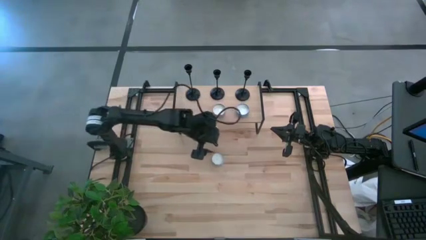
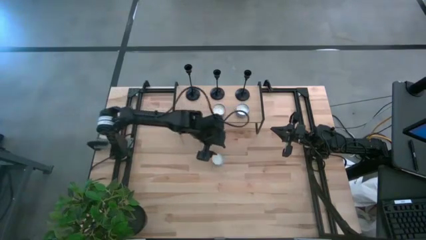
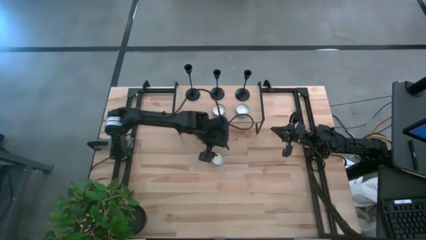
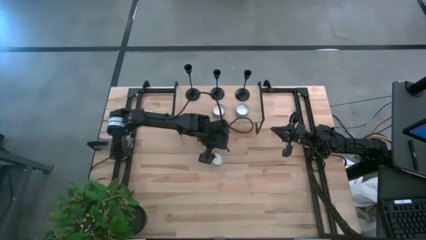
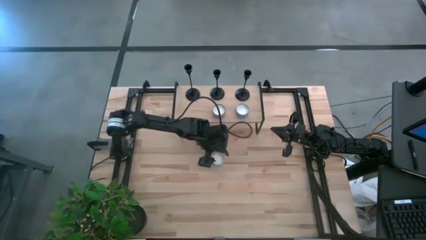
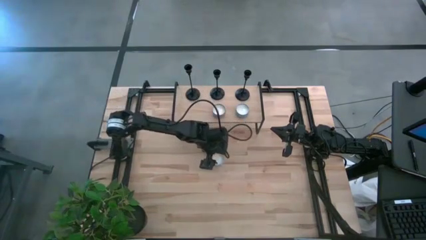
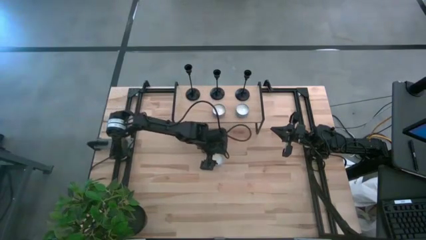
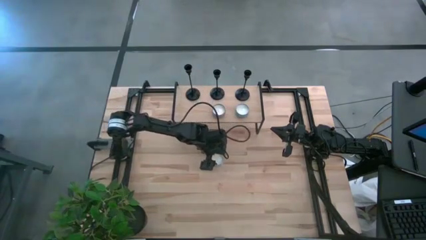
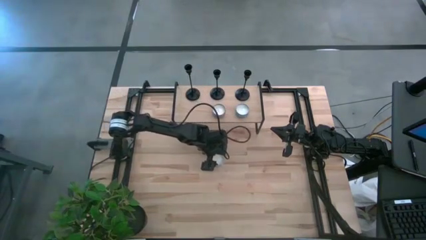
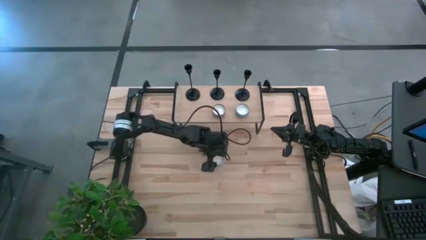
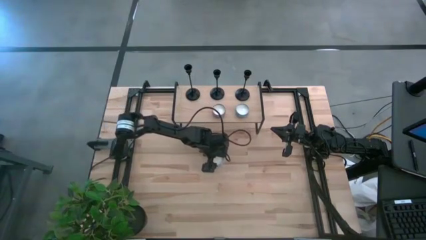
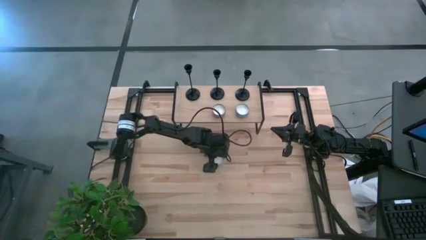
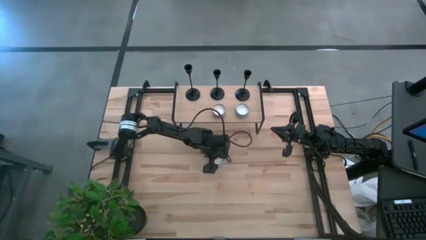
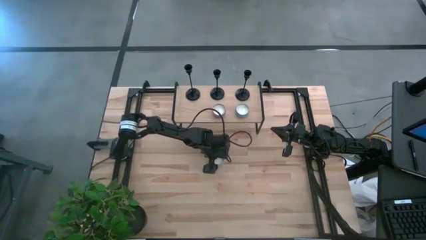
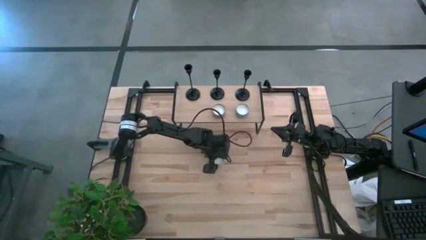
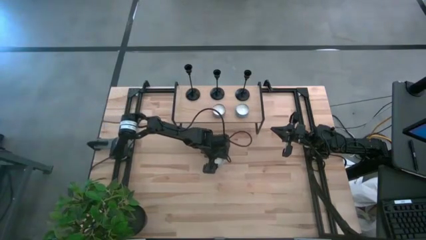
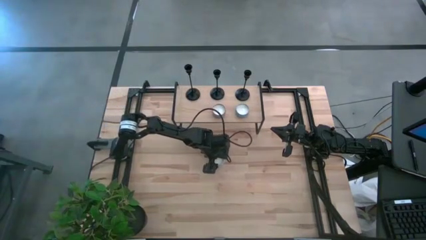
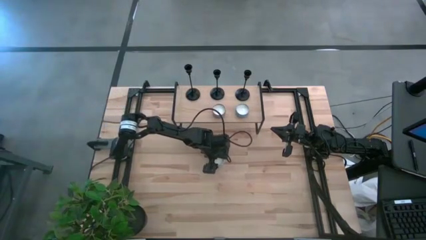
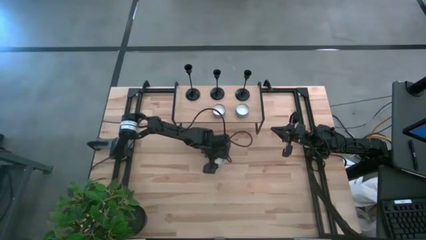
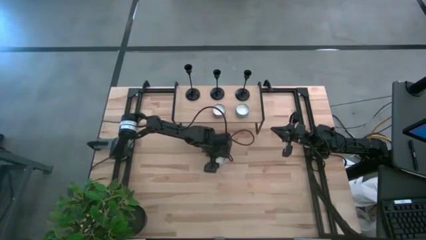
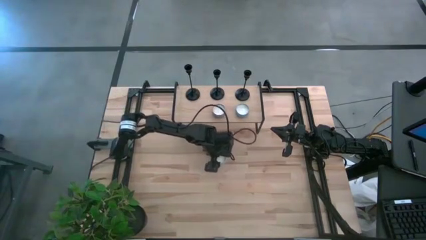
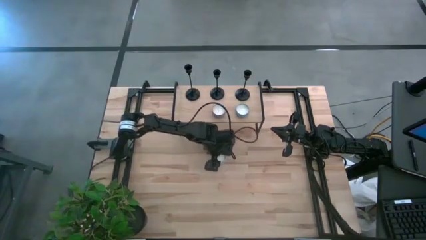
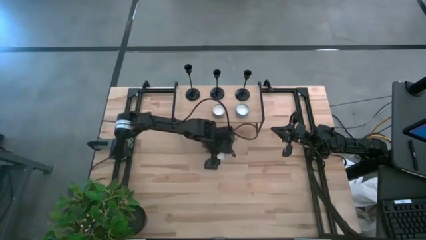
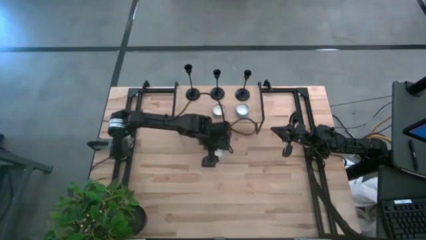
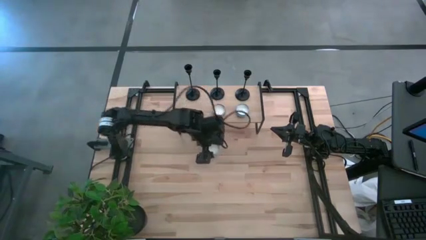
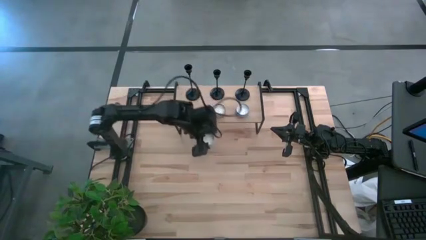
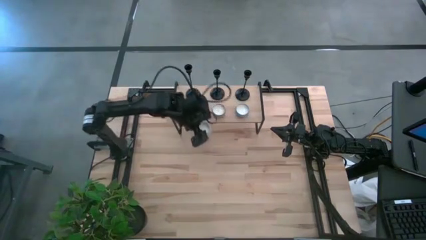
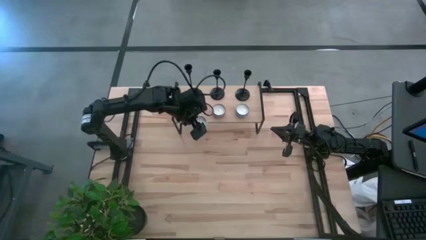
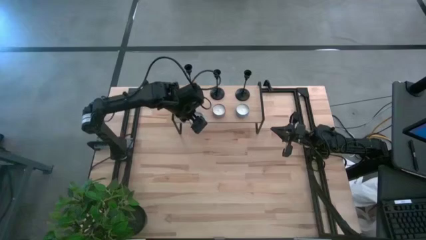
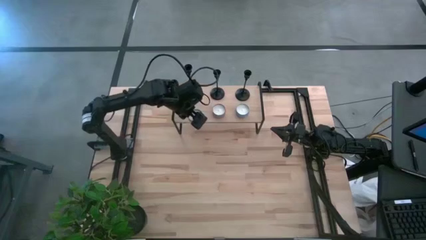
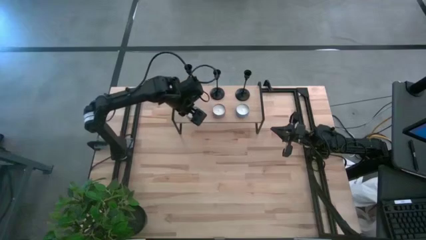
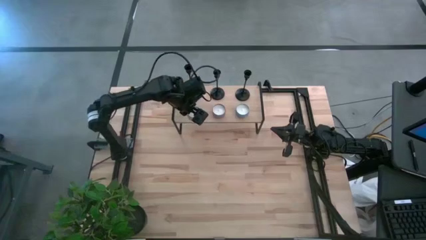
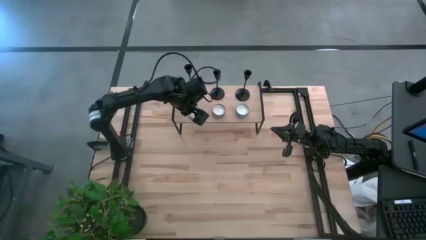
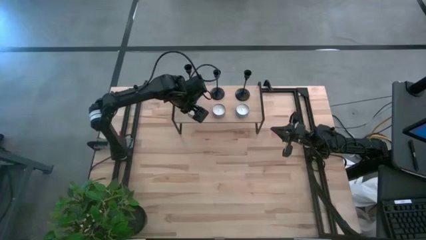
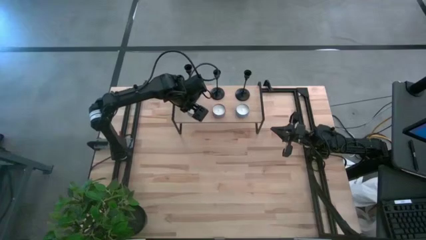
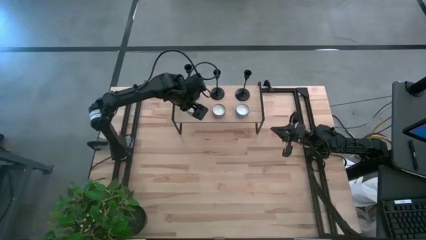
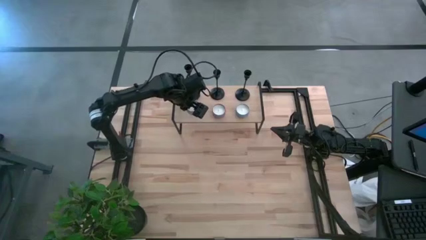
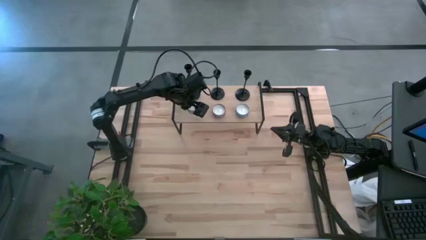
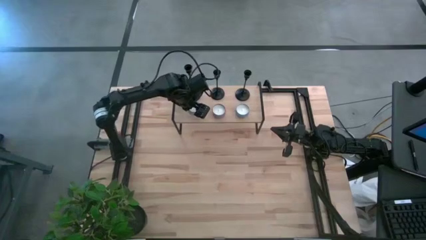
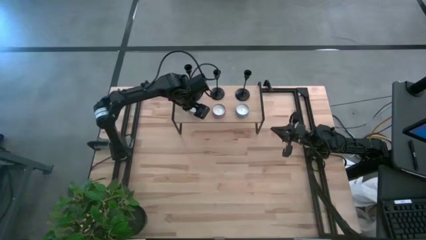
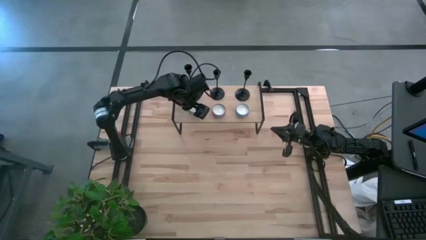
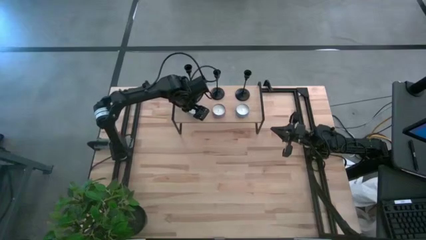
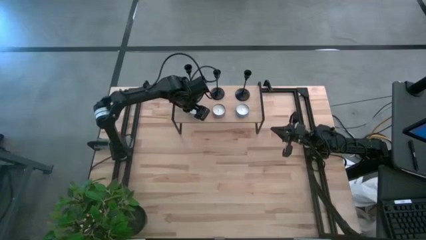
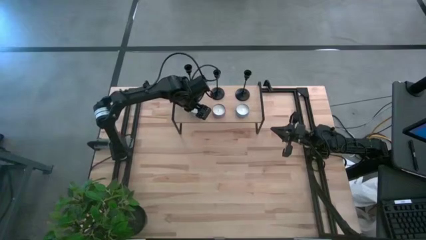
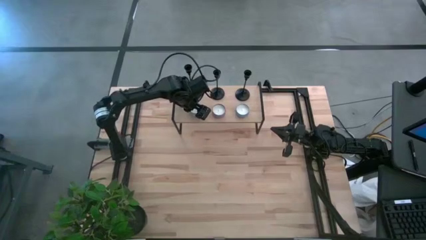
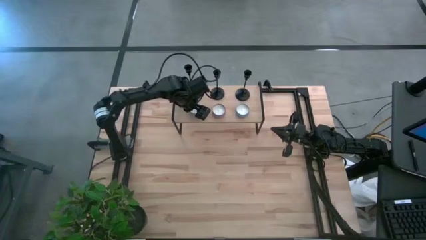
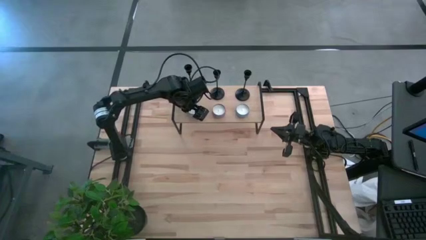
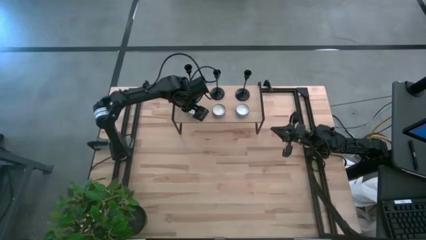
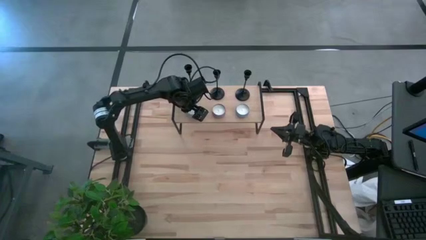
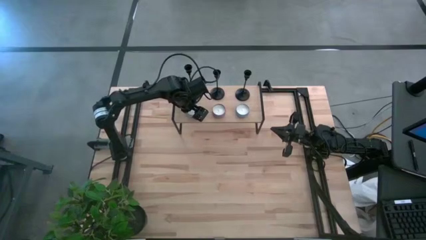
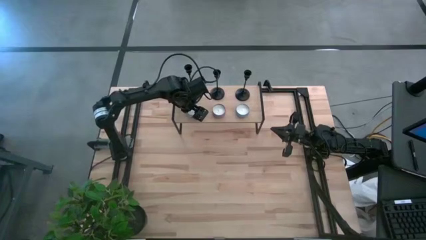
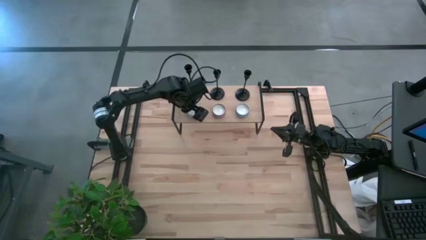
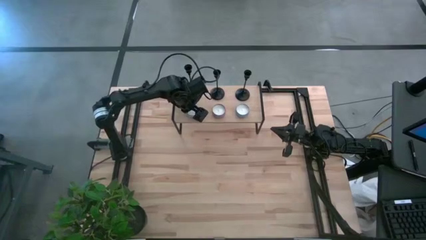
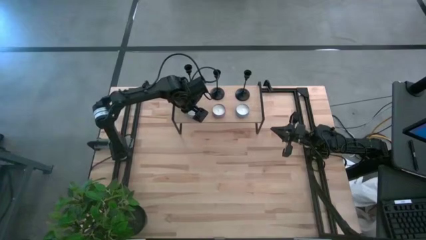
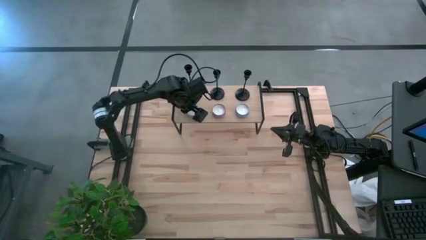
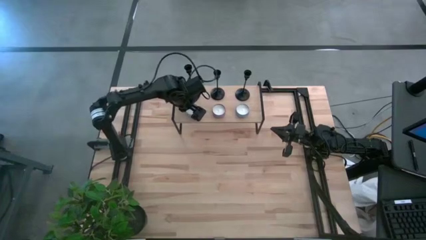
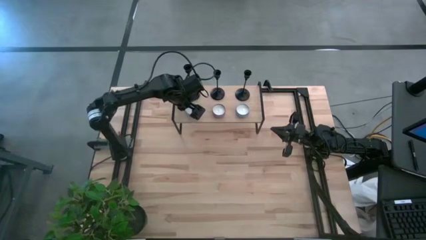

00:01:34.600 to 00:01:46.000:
Task: Pick & Place candle stick holders
Align the red scented candle with the other scented candle on the shelf

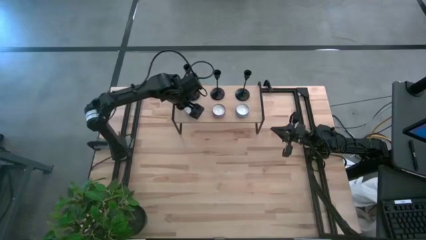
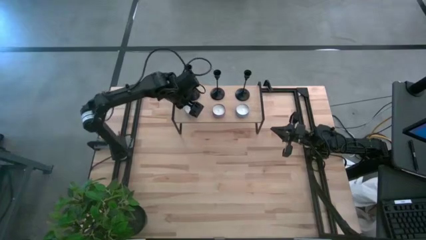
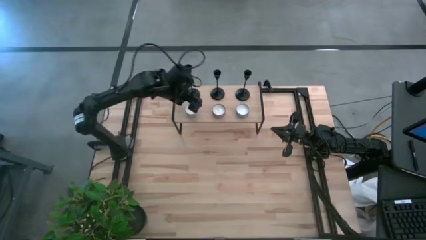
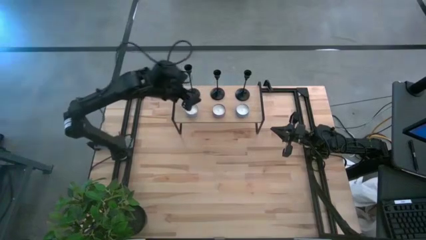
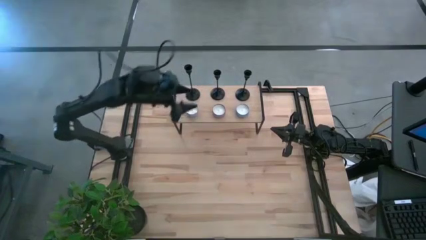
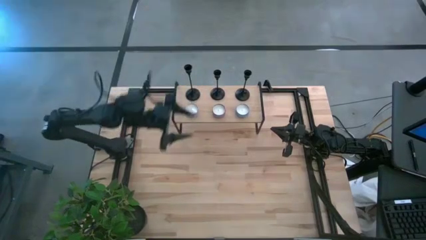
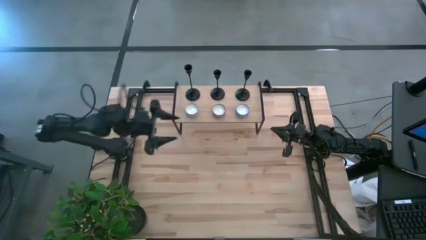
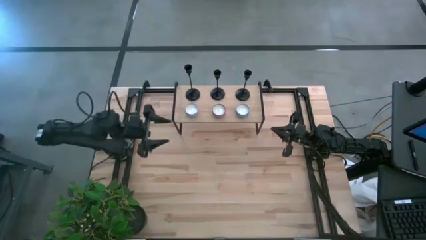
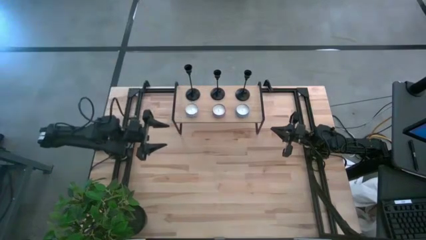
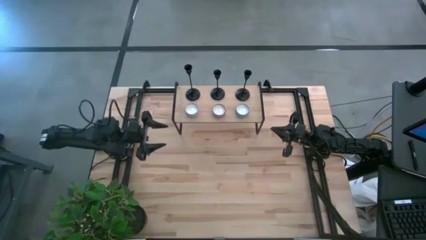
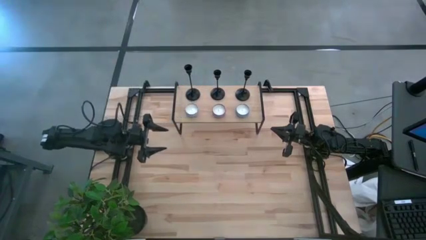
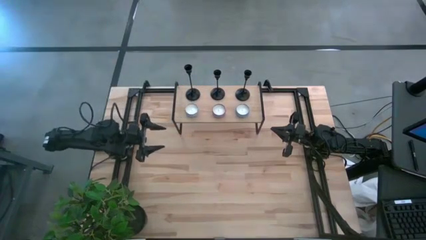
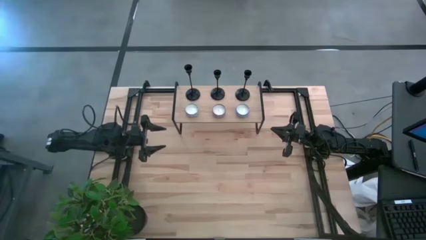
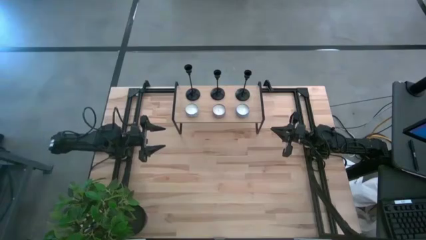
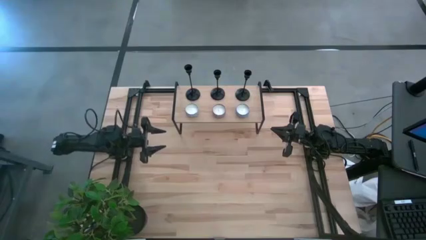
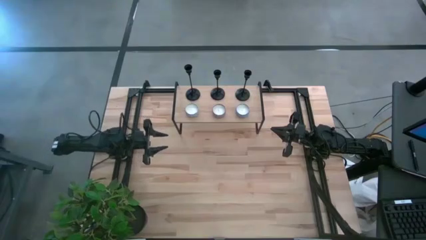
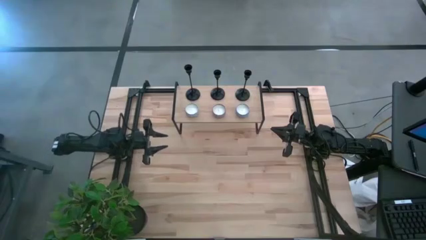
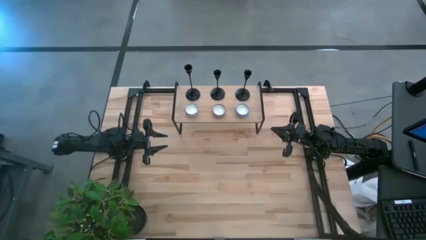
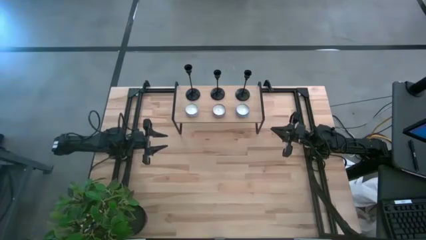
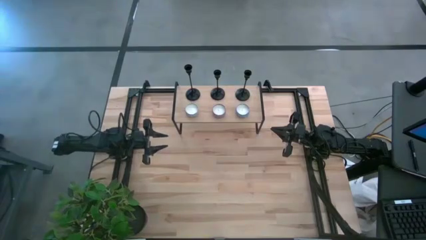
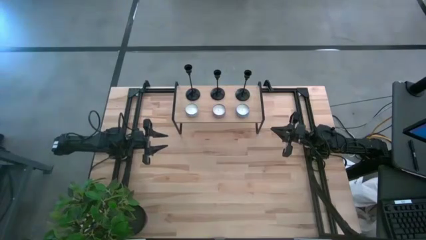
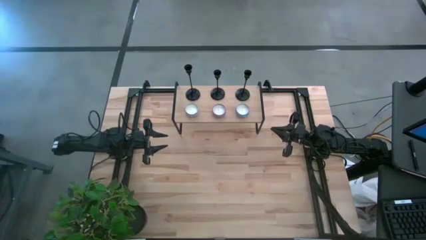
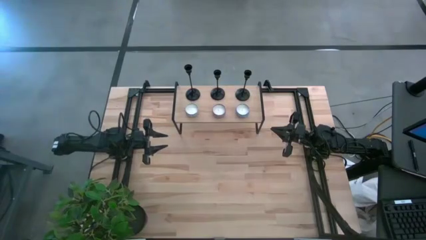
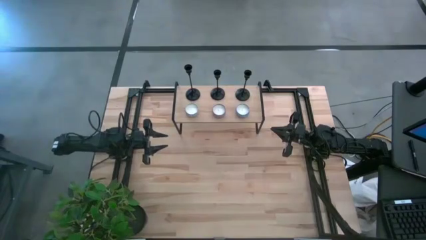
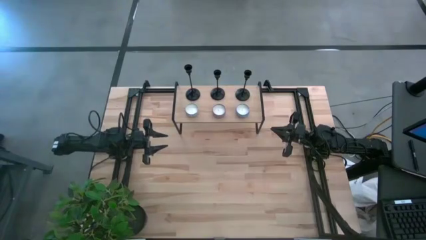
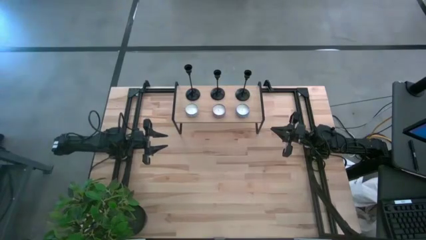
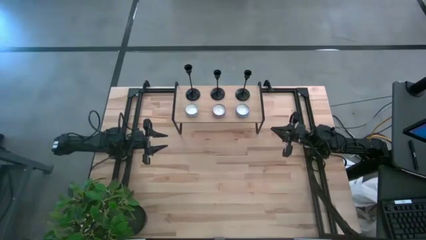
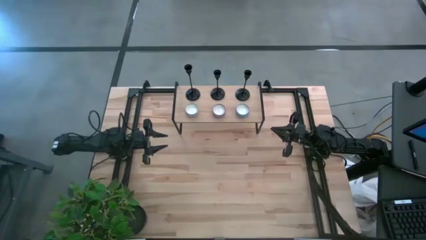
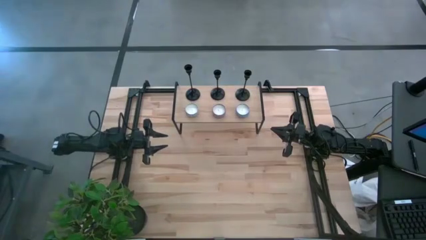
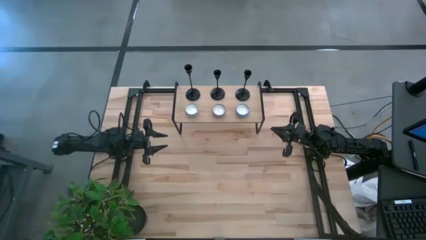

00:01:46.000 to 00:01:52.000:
Return to Home Position
